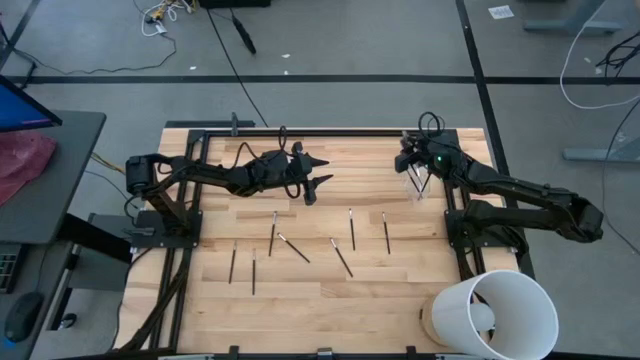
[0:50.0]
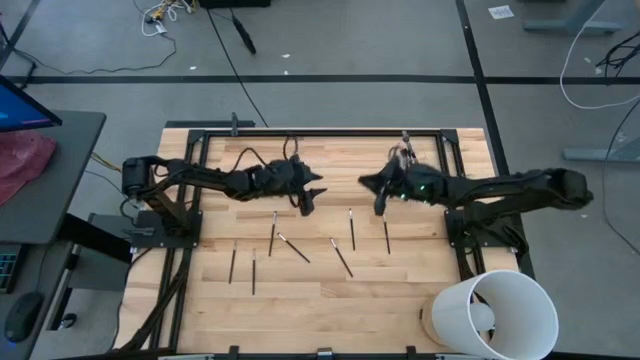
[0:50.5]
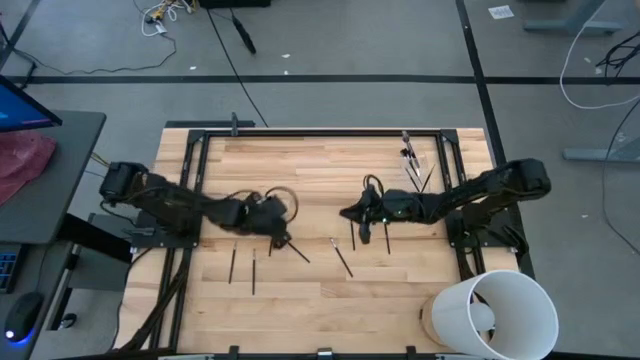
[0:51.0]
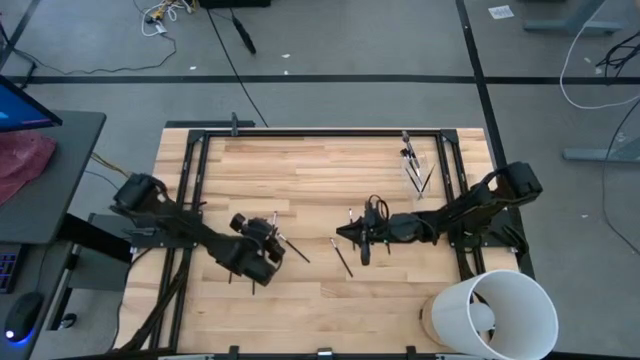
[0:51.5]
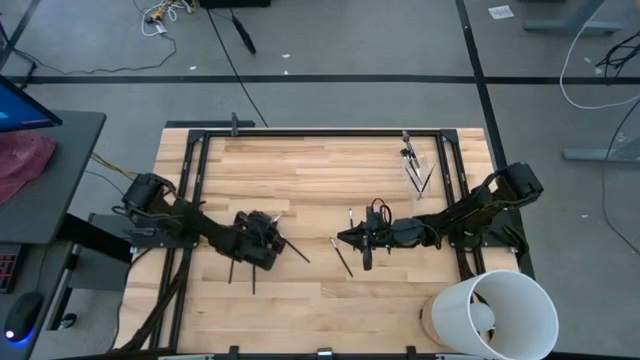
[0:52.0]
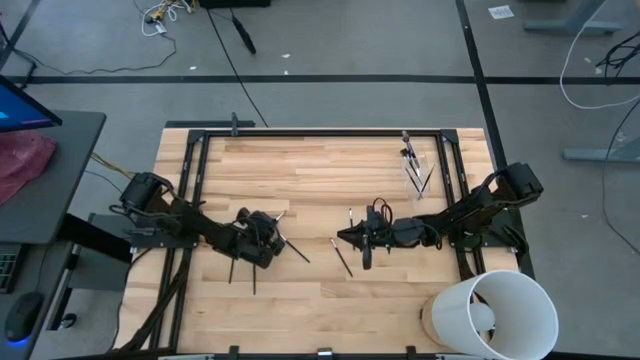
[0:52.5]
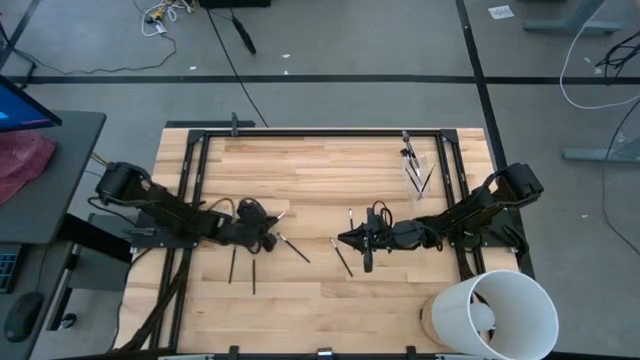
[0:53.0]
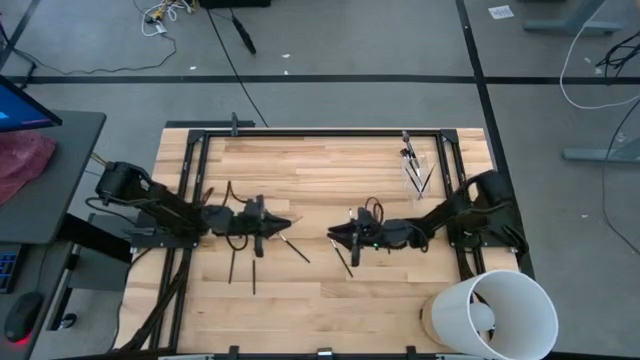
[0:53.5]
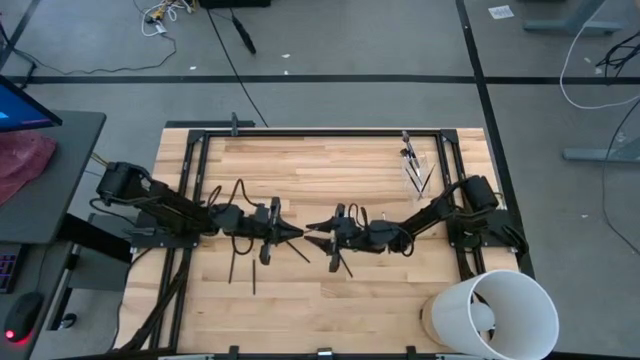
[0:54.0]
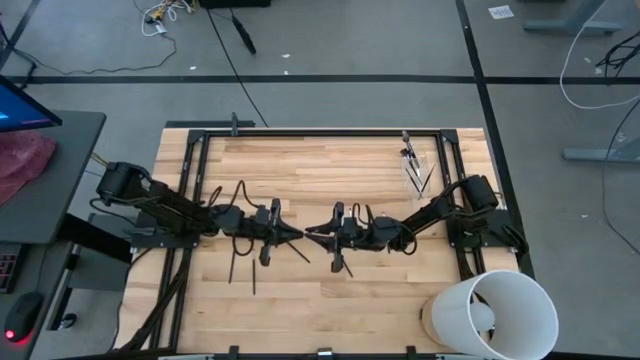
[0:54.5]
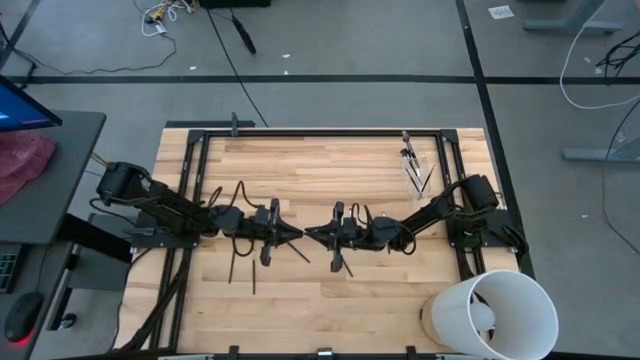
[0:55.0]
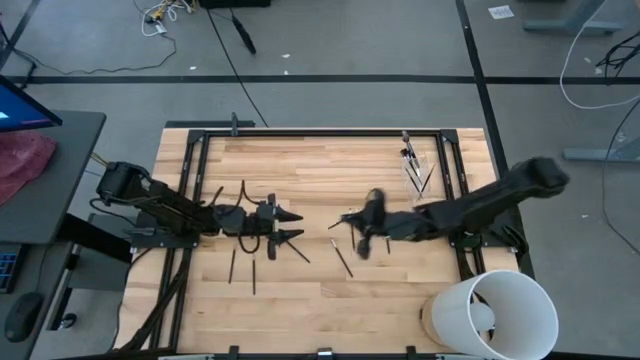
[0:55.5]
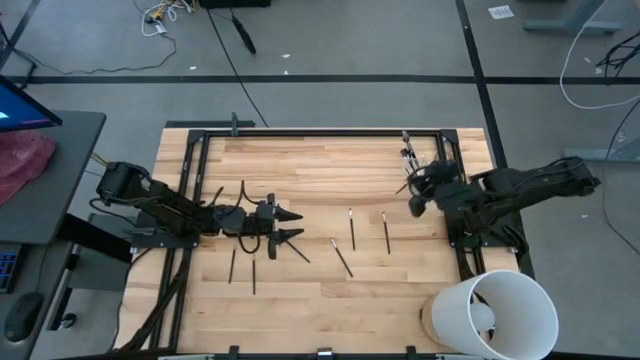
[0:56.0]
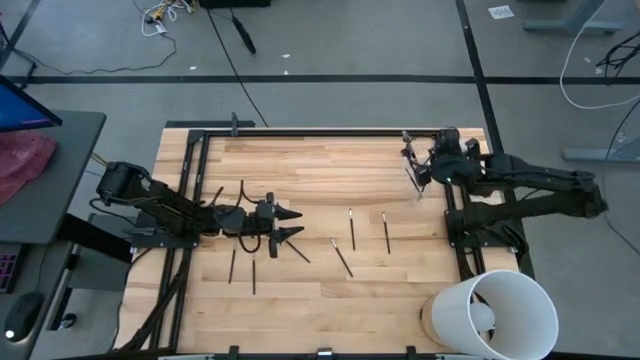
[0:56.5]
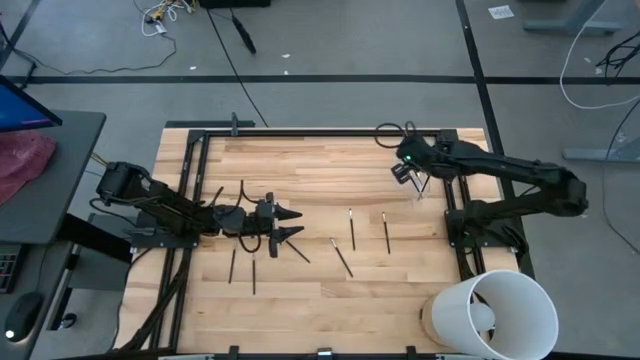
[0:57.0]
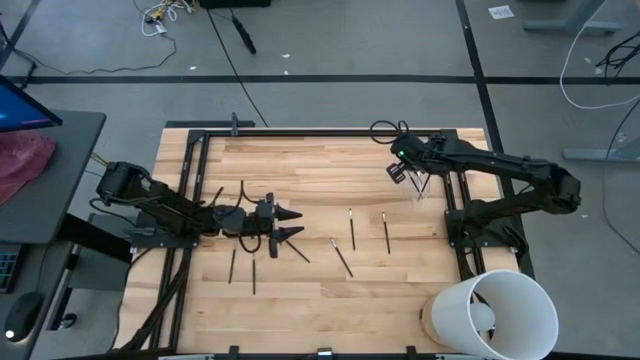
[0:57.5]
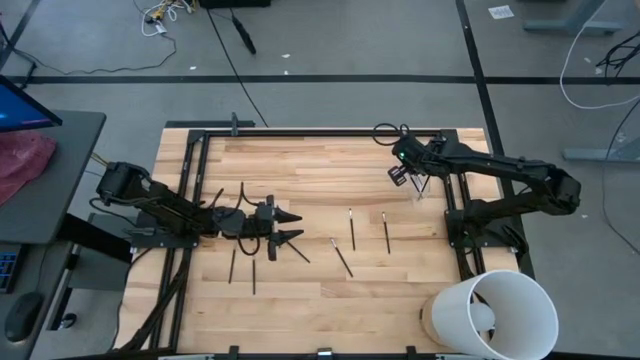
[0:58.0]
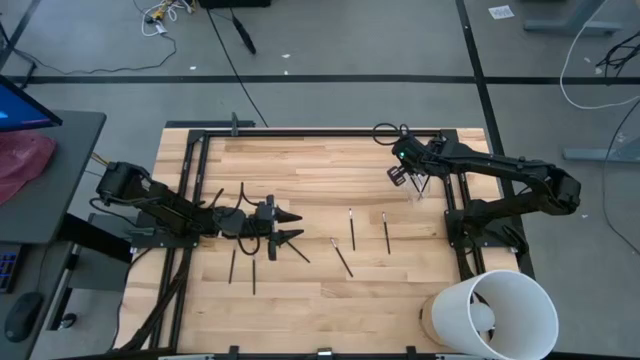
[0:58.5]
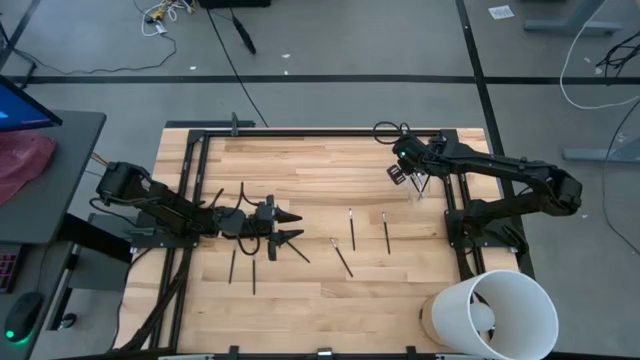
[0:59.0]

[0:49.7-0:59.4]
Task: Put items in baskets/containers
Put the eyeshadow brush into the transparent organizer

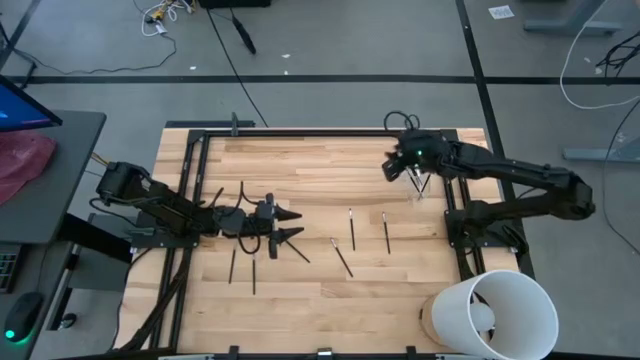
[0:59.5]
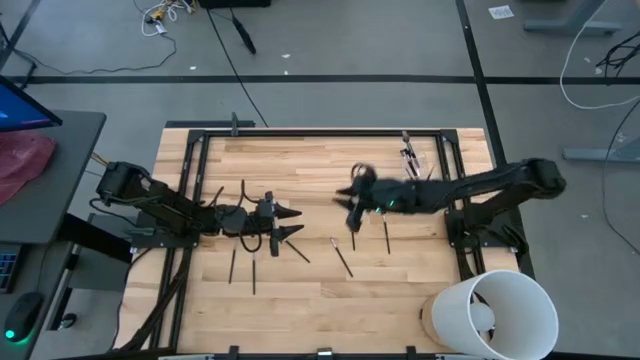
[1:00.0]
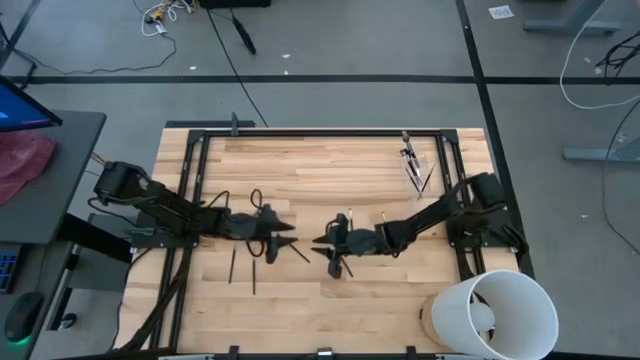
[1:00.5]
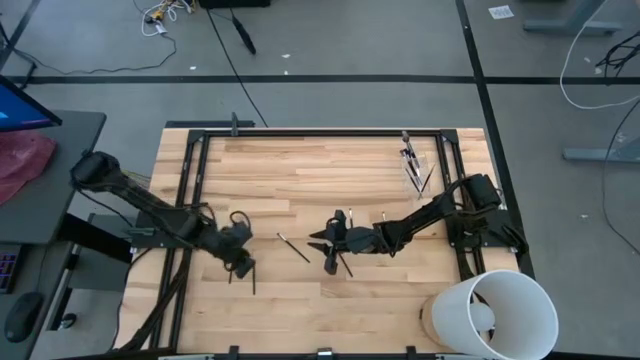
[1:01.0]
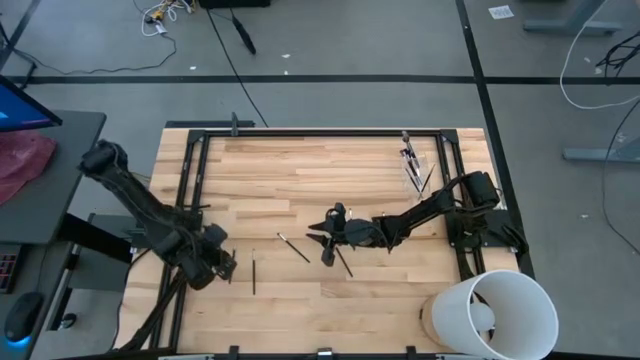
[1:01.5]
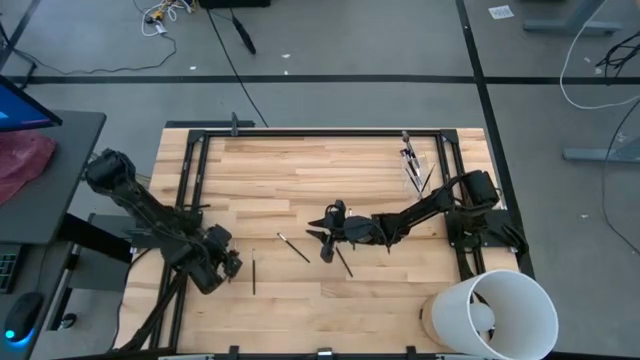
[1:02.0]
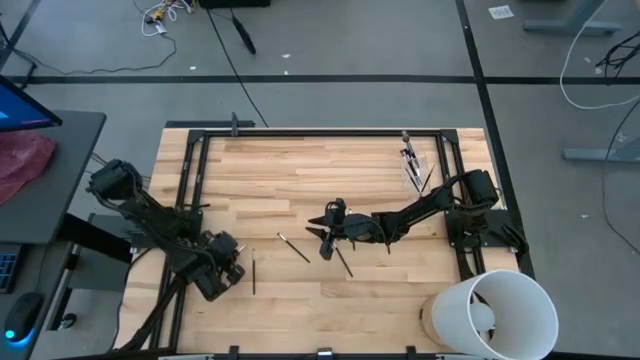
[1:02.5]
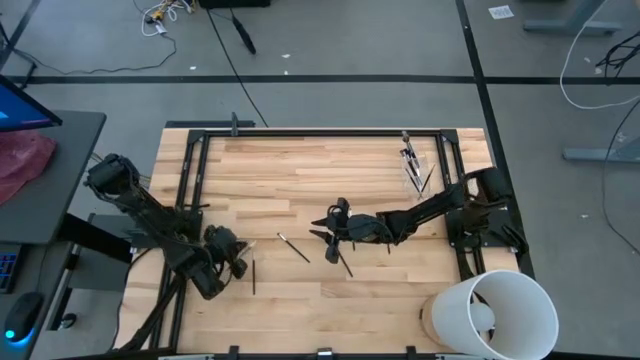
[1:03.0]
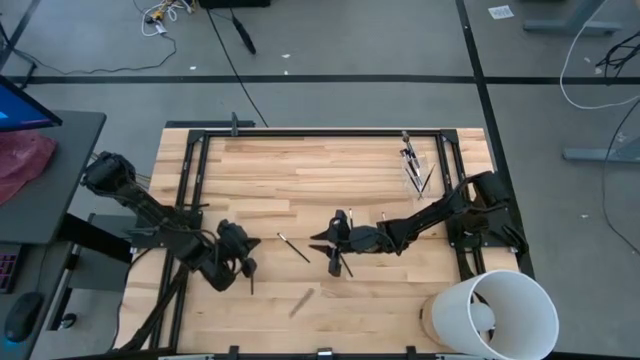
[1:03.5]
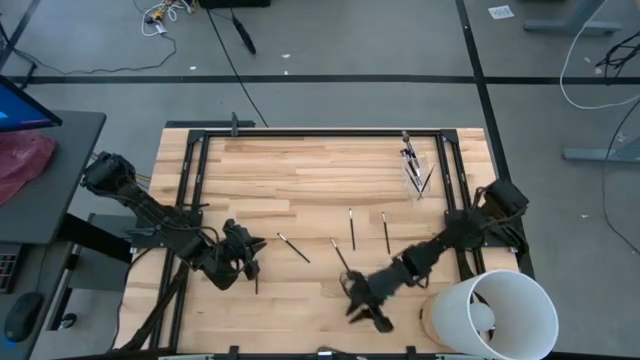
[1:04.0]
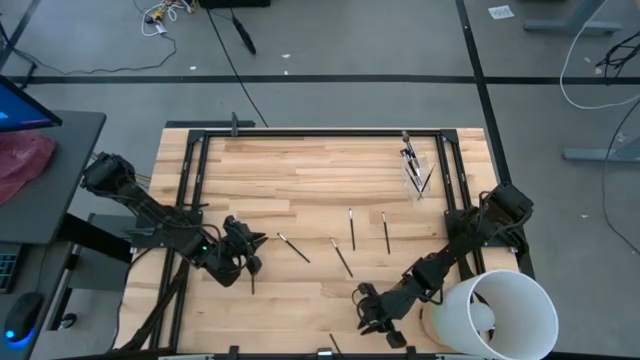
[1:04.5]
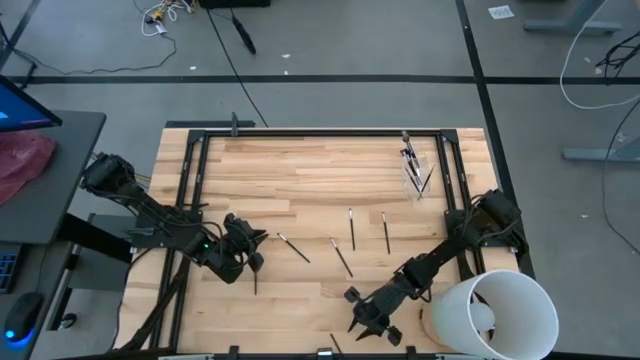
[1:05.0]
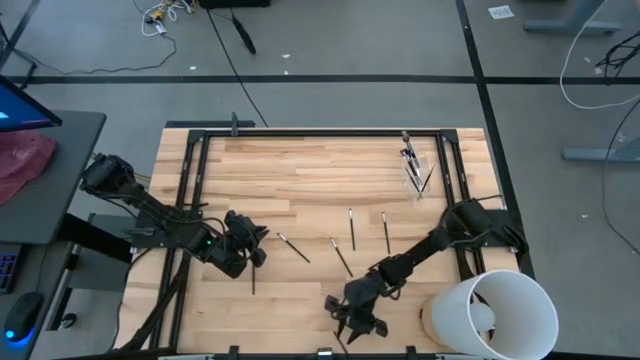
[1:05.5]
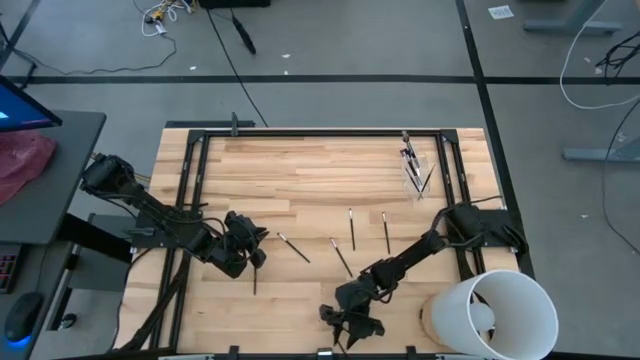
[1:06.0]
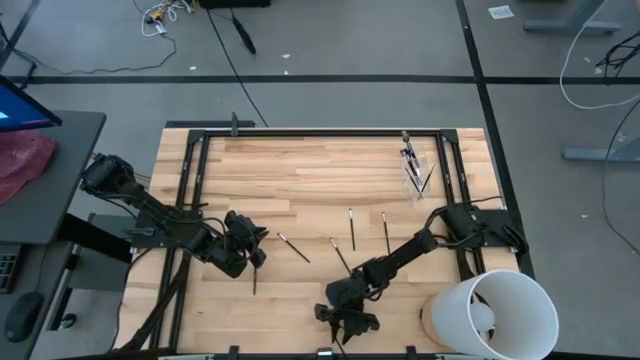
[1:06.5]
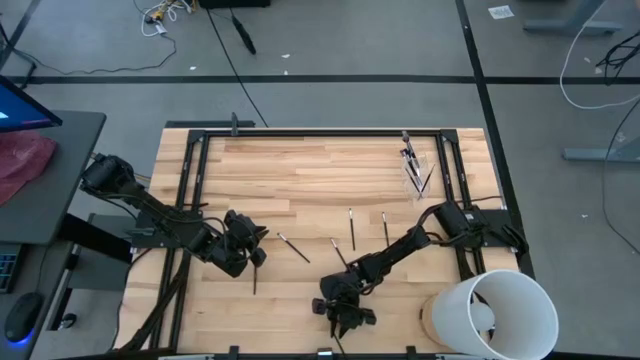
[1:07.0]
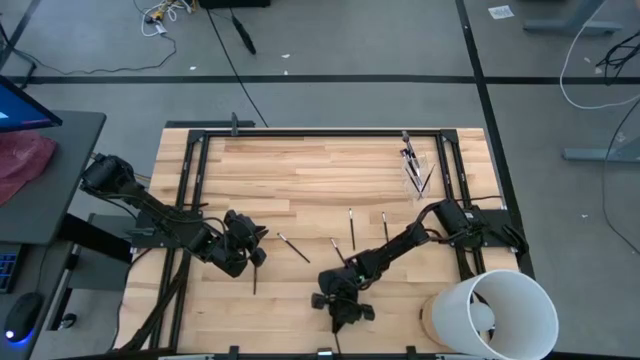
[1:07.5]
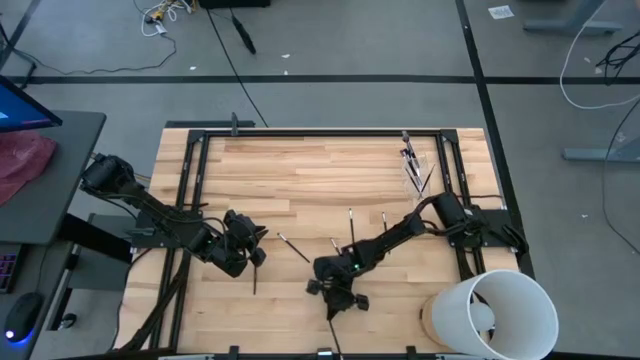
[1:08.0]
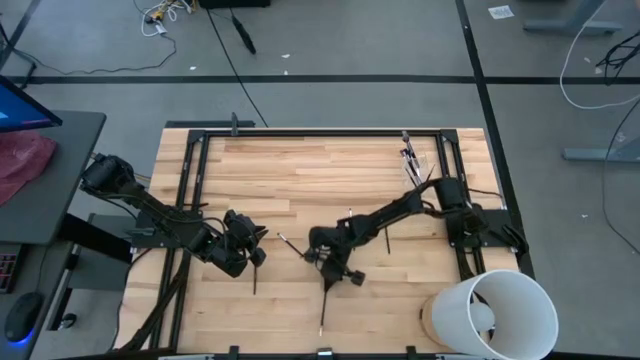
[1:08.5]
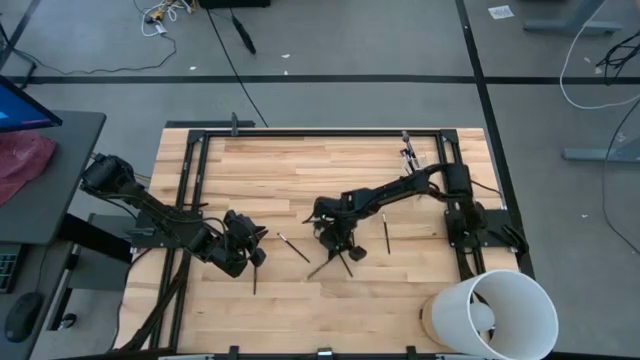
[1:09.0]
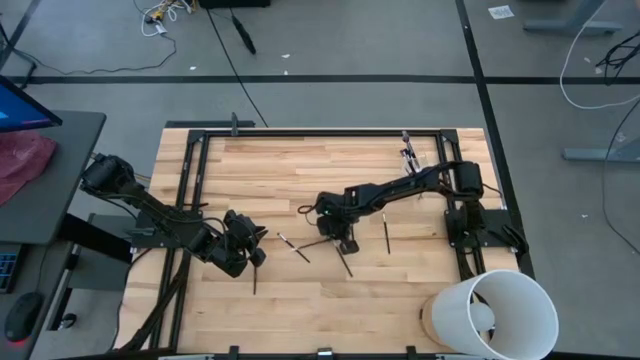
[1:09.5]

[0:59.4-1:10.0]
Put the liner brush into the transparent organizer

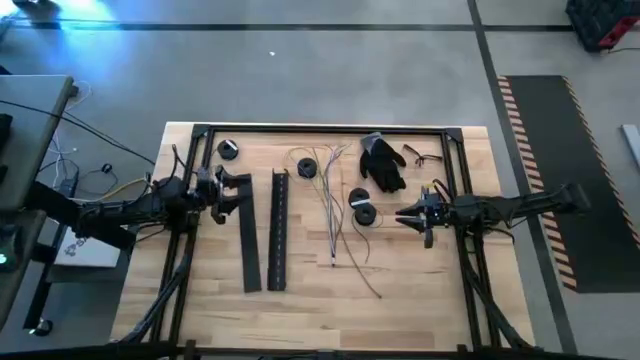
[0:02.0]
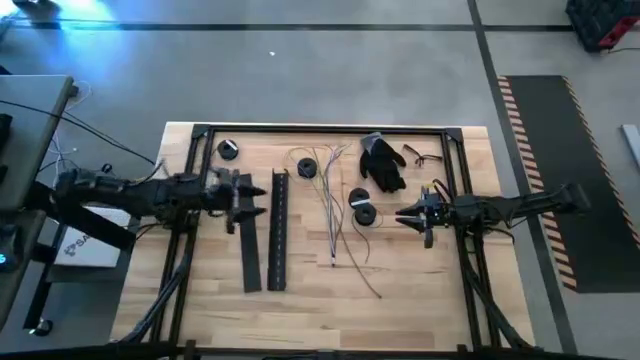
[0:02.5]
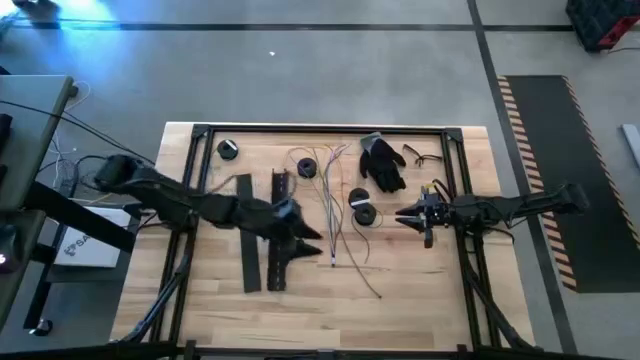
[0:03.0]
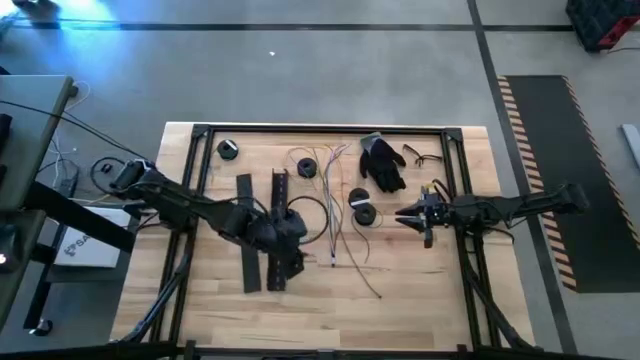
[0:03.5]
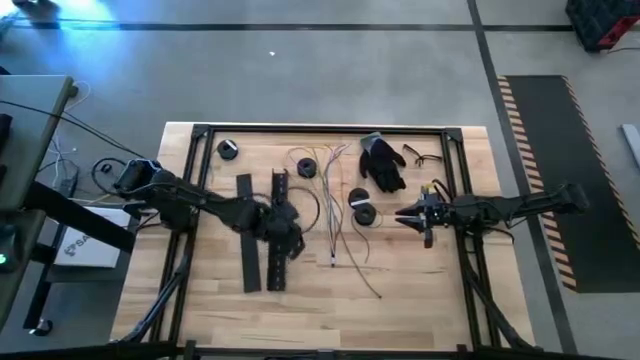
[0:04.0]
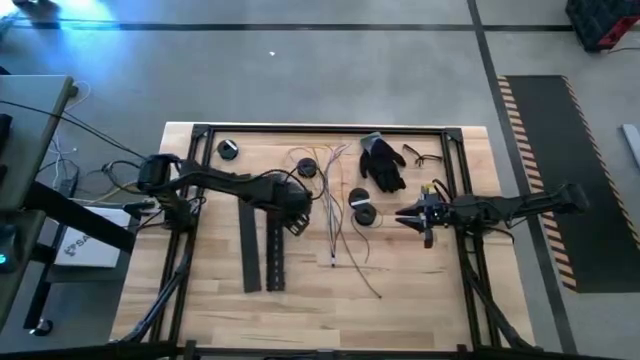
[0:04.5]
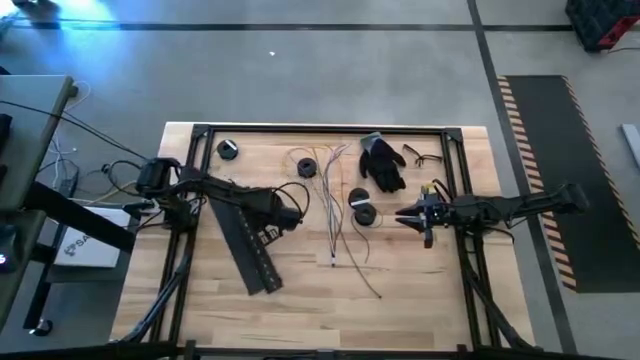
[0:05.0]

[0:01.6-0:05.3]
Task: Ziptie cables
Move the black cable duct to the middle left of the table
